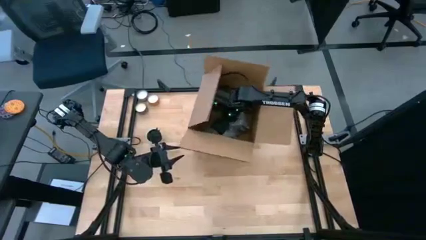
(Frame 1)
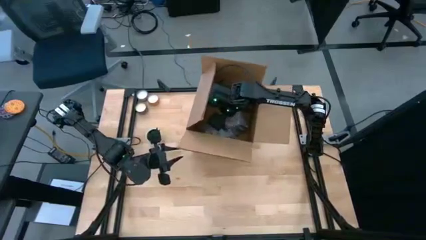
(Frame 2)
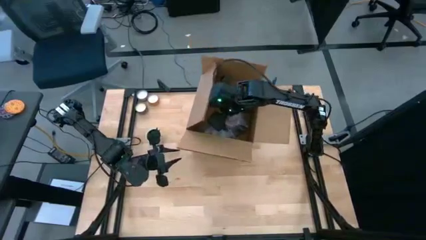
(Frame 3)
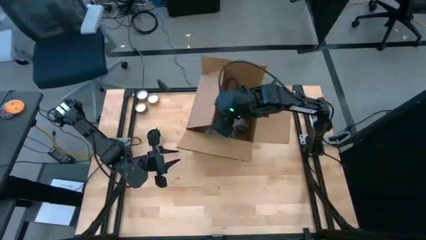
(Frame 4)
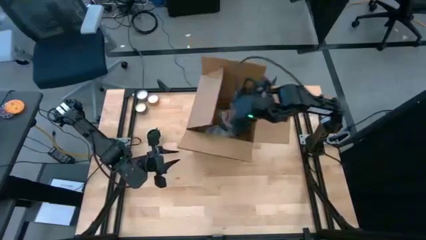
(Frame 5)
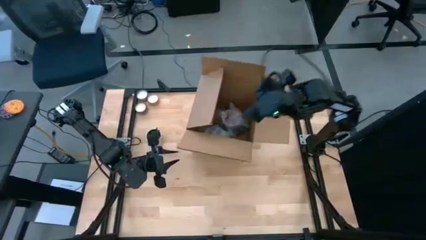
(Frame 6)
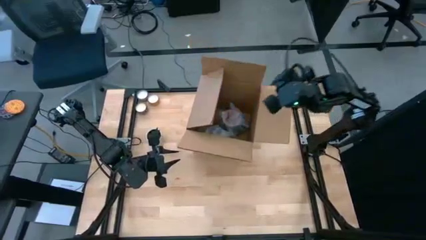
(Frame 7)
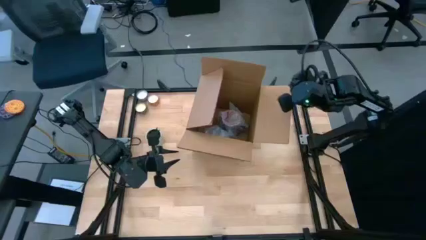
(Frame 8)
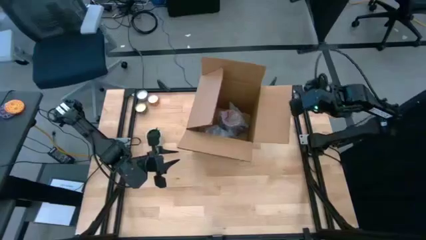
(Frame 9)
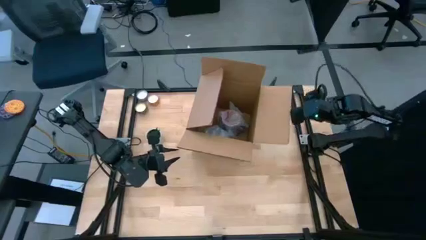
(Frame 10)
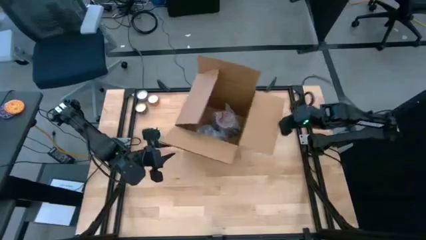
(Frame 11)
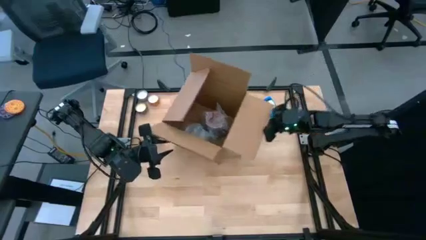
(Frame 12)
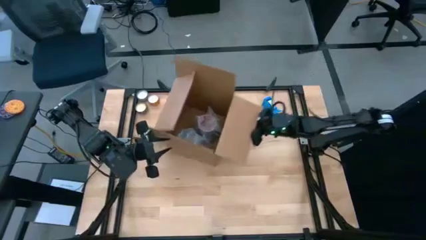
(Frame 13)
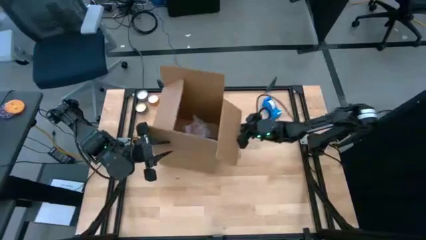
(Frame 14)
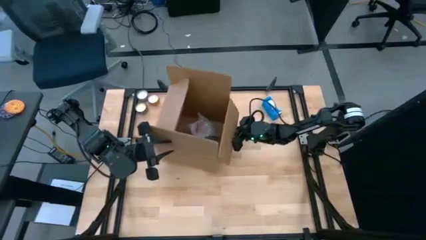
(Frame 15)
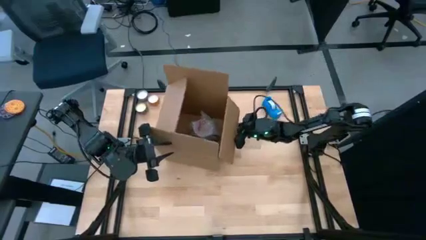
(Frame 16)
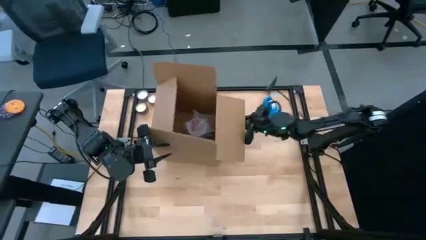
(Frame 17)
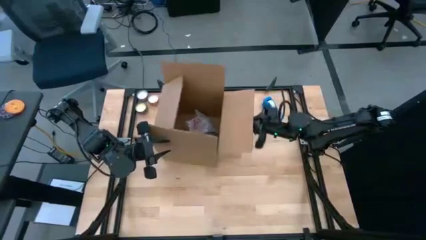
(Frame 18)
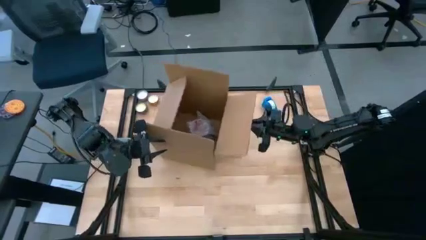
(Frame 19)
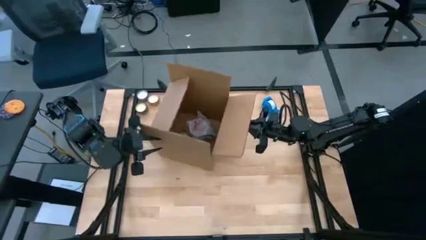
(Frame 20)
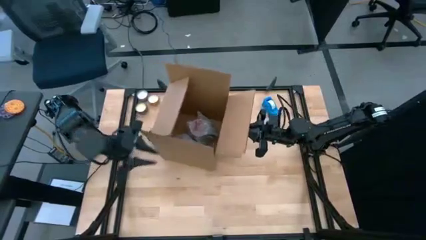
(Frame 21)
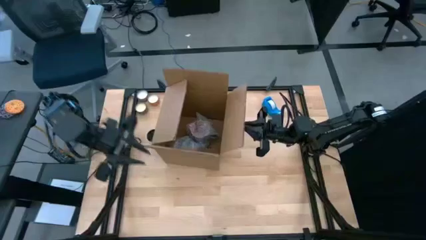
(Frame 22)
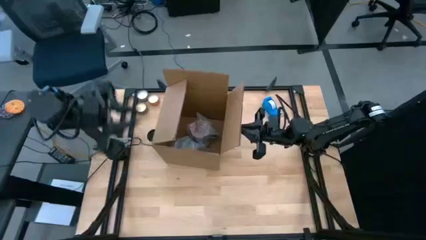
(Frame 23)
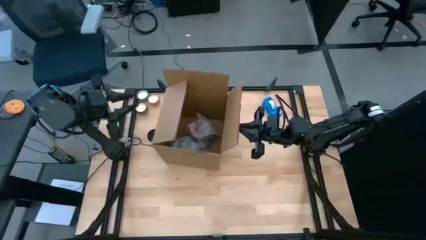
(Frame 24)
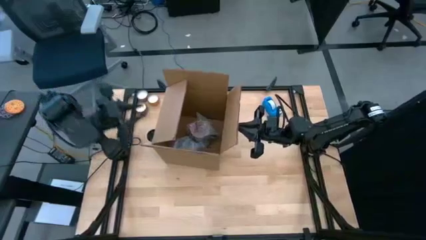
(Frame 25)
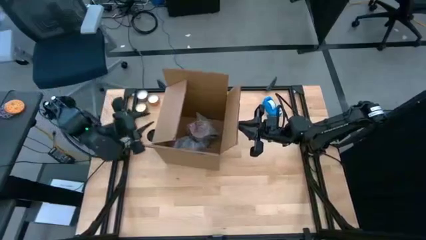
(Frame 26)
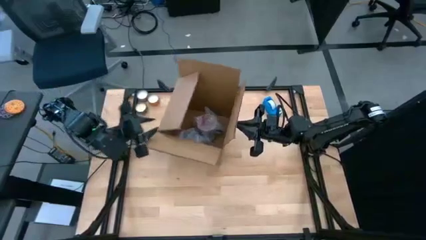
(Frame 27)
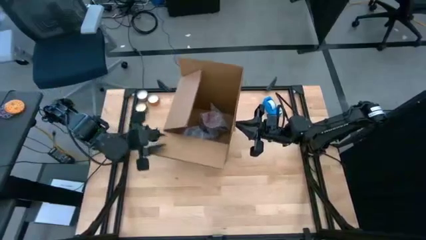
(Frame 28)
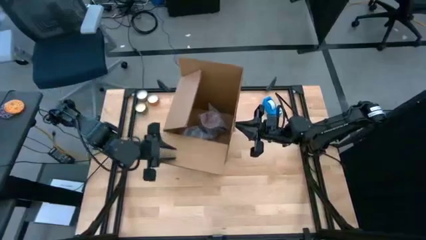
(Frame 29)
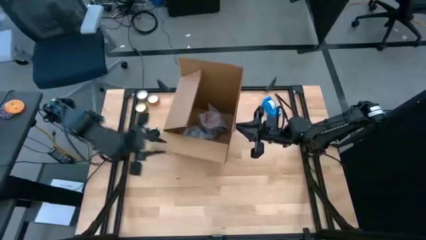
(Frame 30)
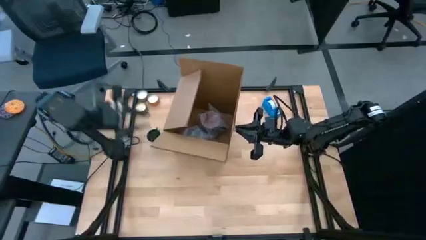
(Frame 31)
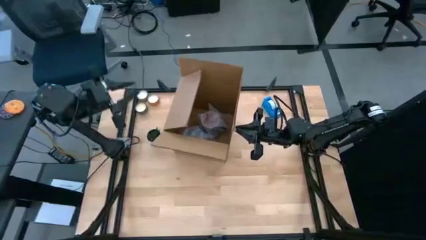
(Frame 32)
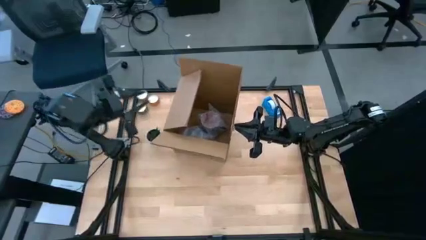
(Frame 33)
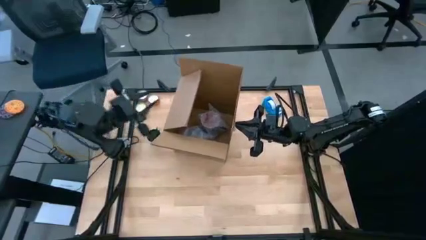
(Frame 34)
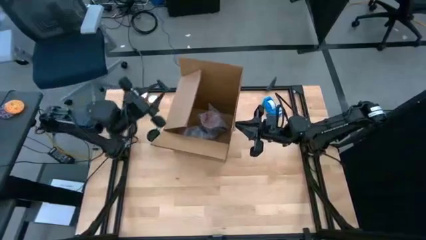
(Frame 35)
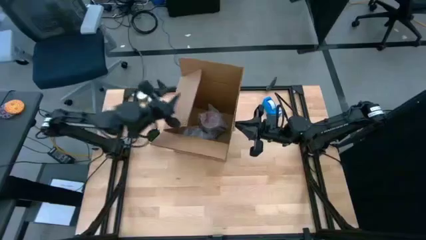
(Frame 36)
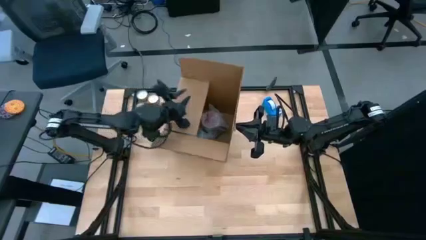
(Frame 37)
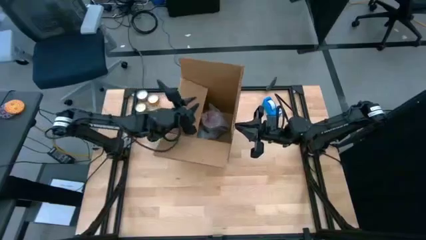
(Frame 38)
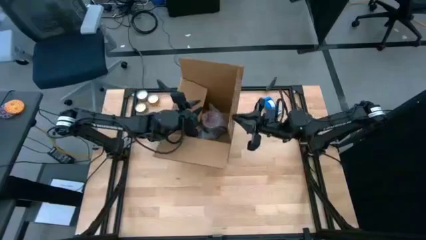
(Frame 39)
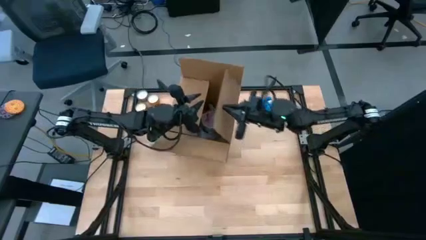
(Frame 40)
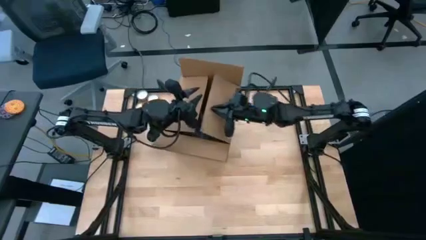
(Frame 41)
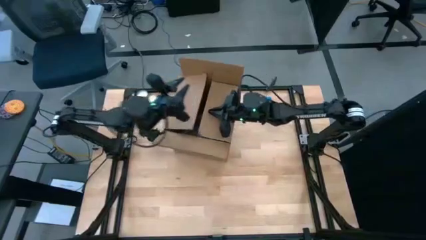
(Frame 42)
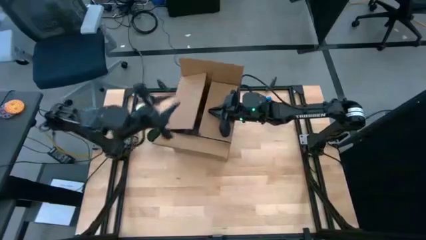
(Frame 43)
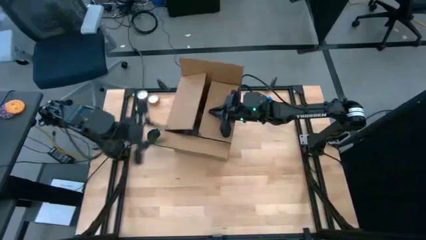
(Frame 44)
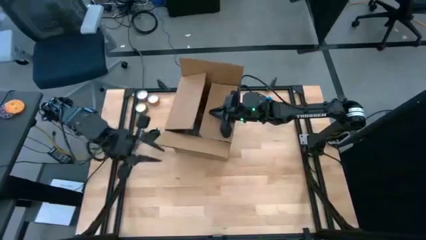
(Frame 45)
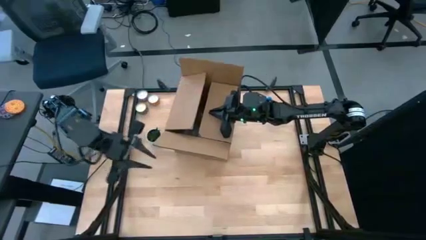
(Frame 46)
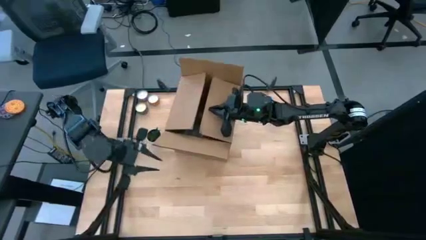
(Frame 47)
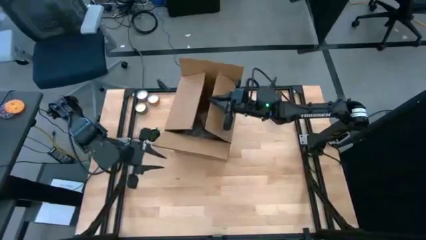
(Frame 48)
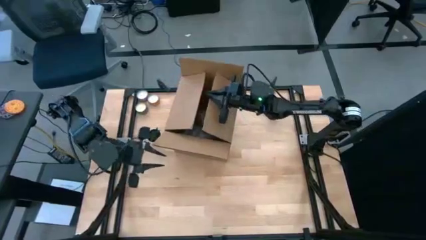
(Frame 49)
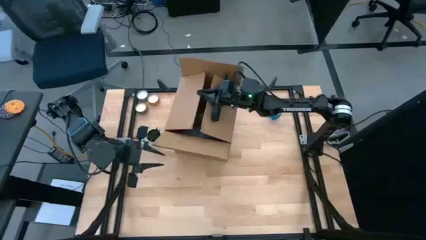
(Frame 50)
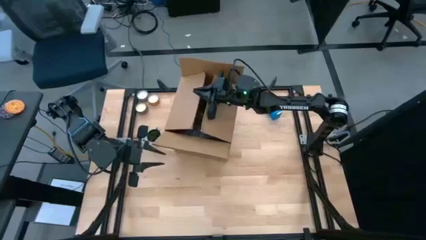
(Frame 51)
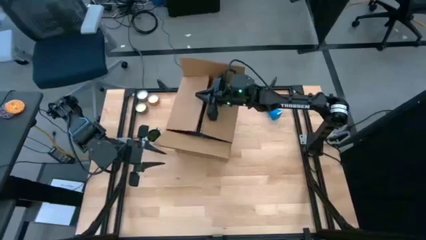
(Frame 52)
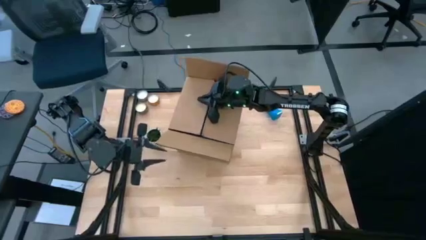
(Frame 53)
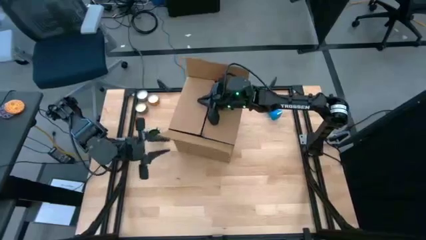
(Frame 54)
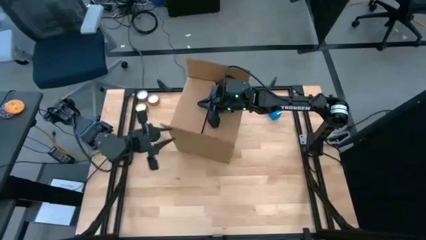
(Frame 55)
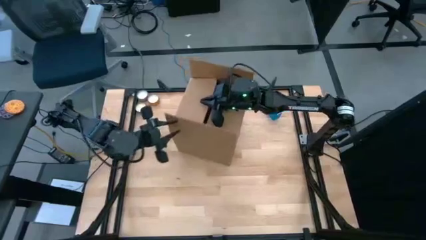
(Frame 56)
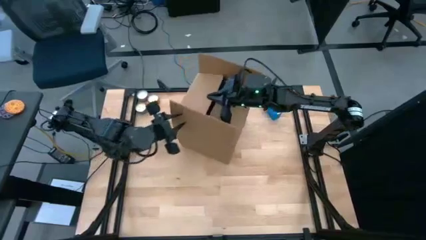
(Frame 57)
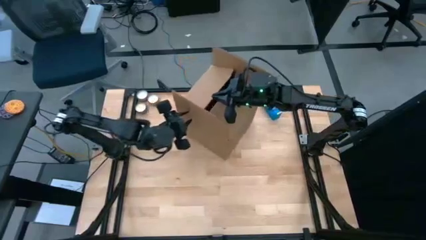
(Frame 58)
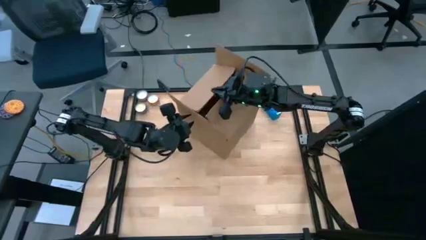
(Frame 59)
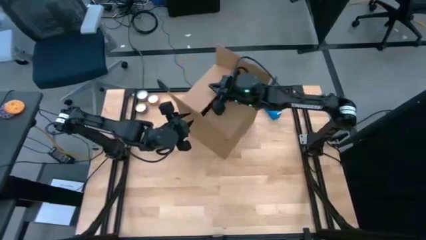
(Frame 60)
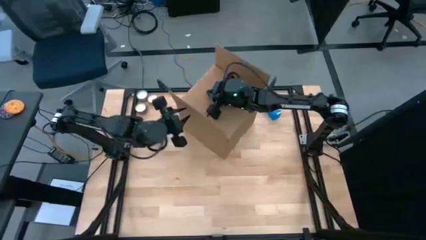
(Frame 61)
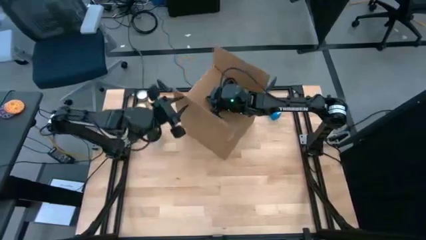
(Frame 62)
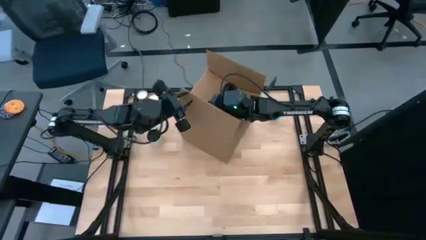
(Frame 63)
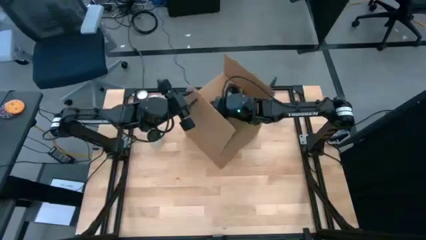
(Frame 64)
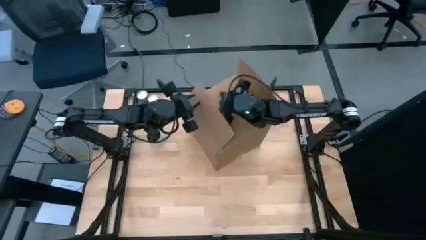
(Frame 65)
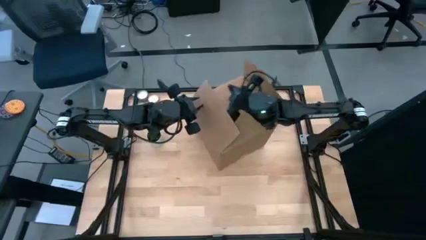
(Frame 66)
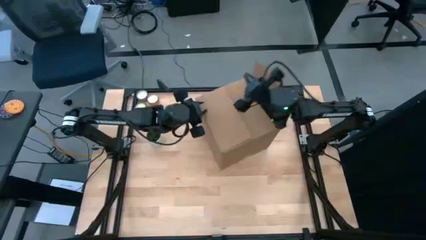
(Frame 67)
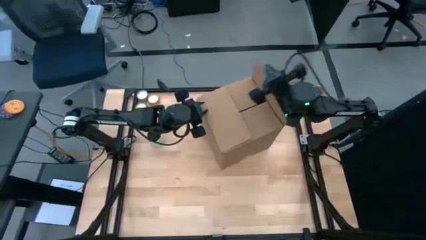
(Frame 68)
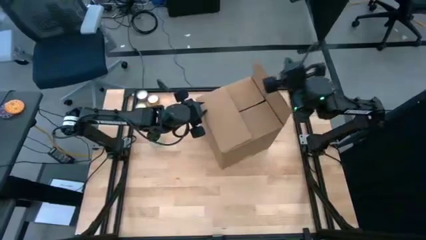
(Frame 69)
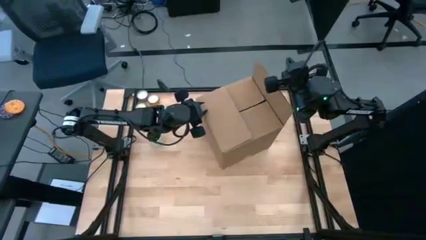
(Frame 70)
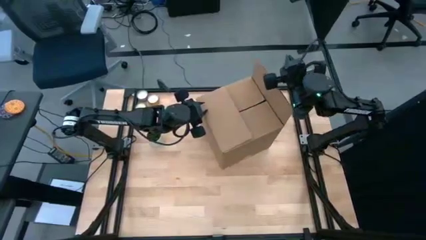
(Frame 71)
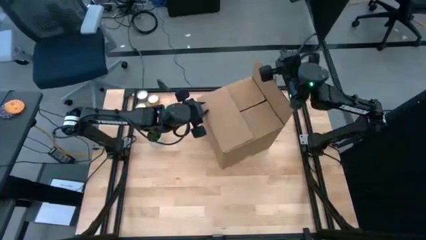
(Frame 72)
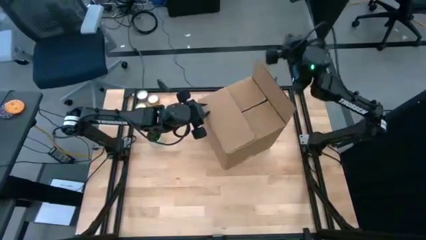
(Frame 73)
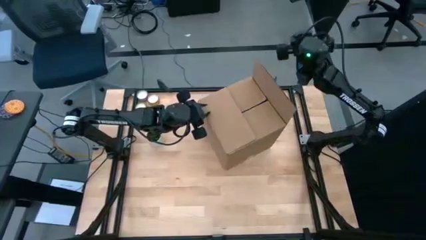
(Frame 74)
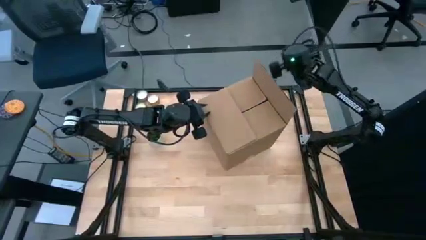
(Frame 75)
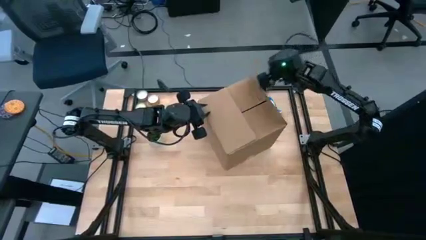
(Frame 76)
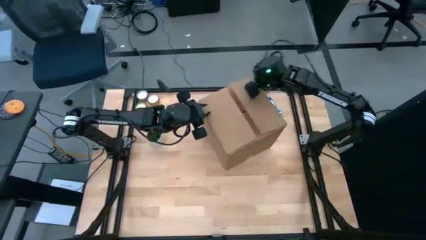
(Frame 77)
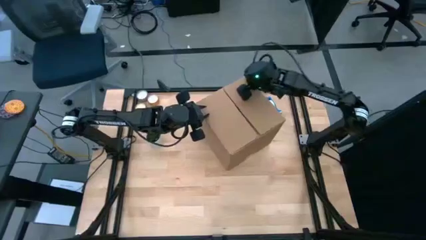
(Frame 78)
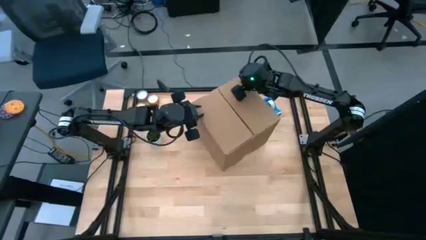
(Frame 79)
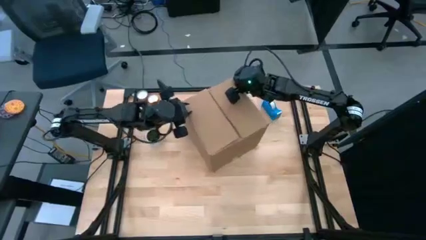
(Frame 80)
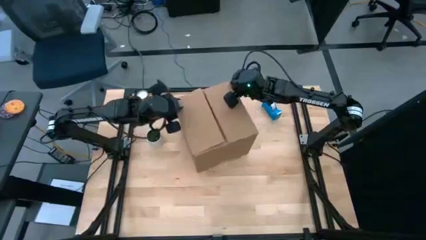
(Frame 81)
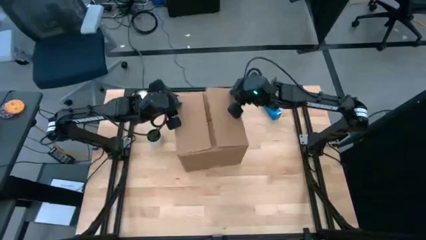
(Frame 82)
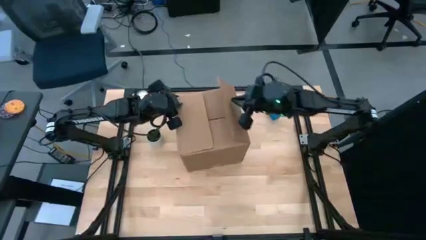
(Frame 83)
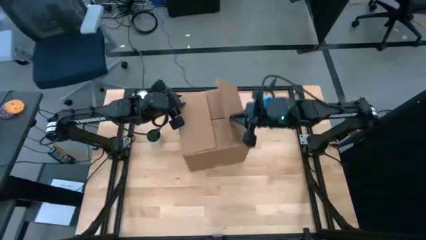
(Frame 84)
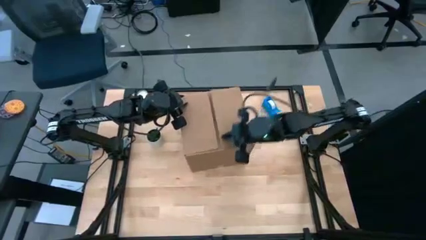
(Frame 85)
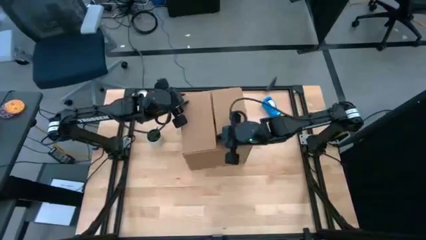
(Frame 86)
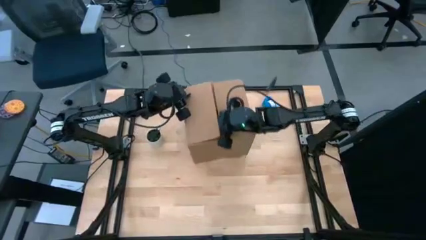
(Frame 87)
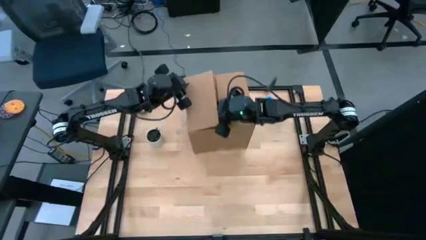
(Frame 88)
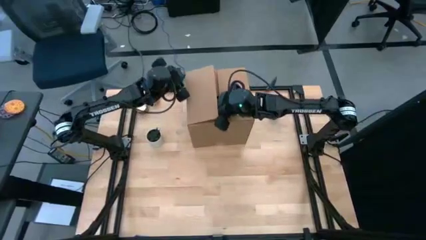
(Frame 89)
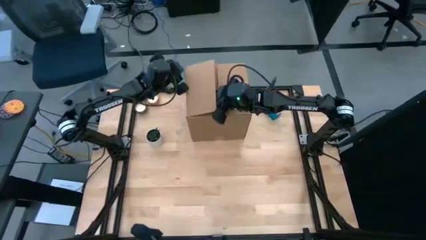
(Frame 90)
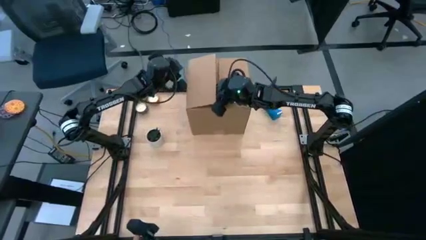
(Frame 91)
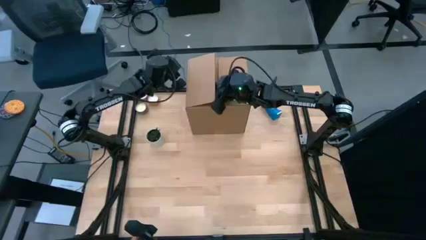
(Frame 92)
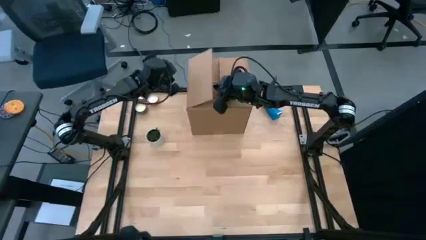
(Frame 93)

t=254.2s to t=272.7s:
Task: wrap mug
Close the cardboard box
